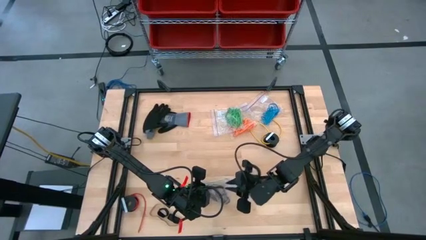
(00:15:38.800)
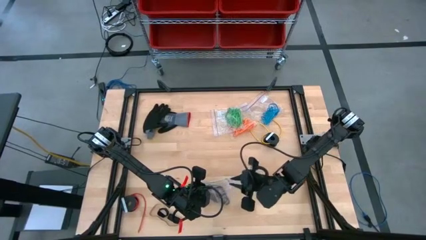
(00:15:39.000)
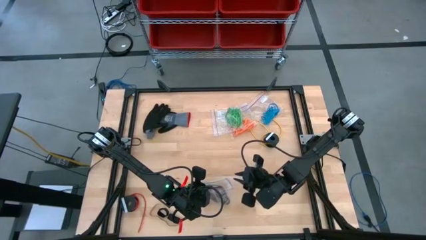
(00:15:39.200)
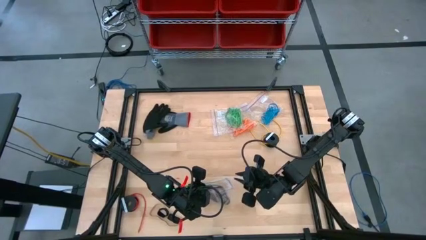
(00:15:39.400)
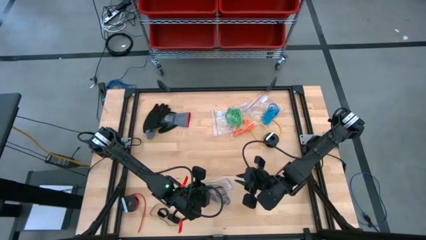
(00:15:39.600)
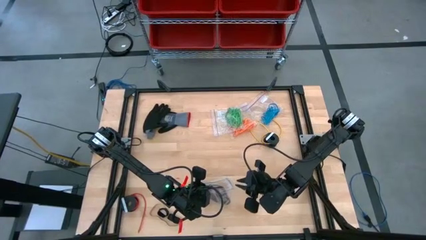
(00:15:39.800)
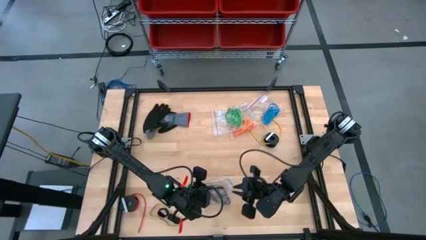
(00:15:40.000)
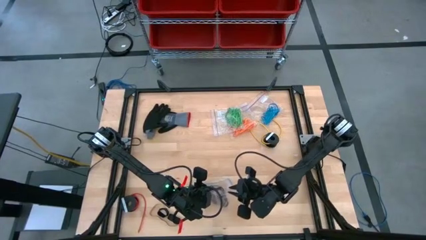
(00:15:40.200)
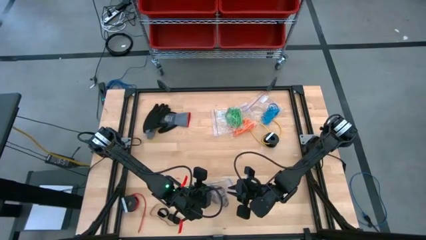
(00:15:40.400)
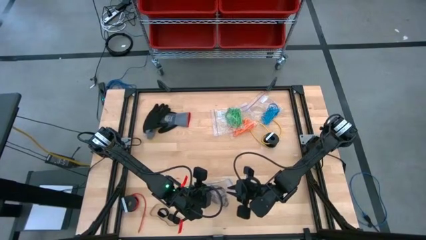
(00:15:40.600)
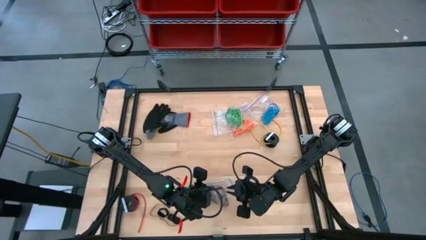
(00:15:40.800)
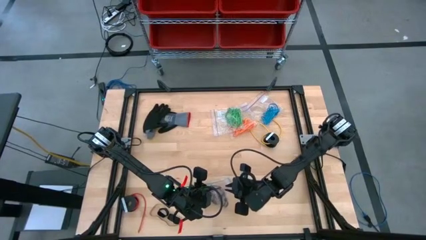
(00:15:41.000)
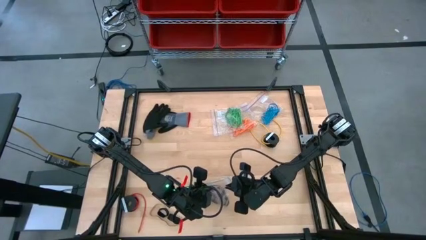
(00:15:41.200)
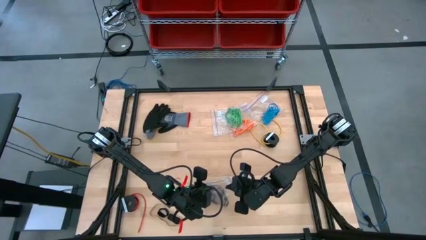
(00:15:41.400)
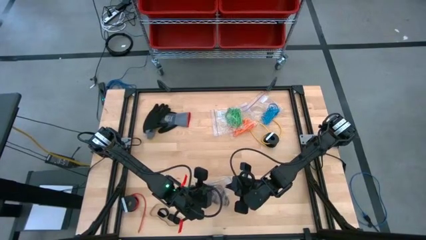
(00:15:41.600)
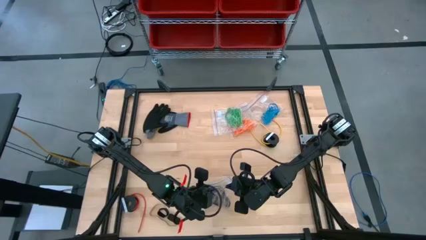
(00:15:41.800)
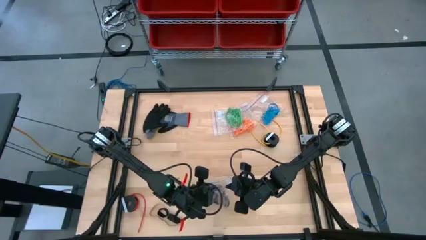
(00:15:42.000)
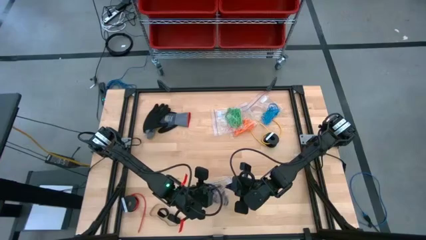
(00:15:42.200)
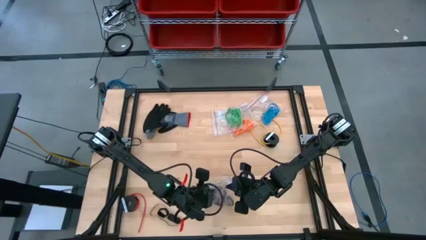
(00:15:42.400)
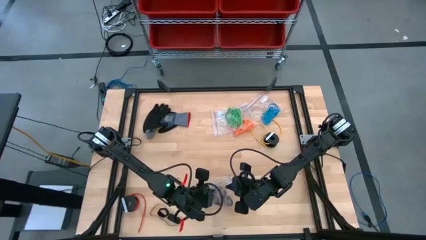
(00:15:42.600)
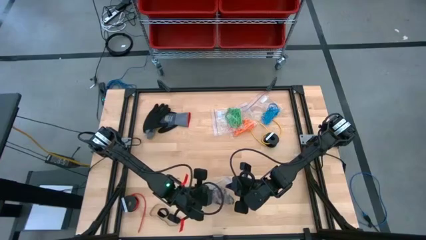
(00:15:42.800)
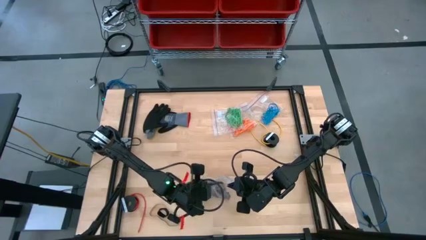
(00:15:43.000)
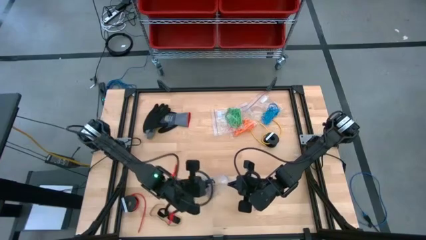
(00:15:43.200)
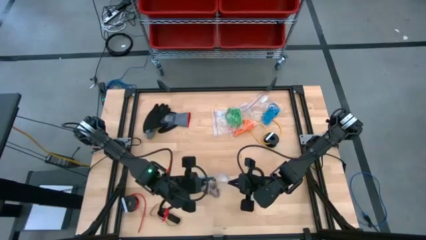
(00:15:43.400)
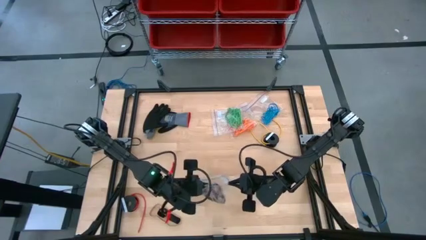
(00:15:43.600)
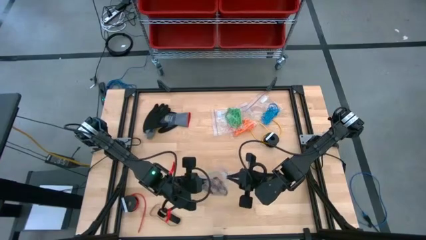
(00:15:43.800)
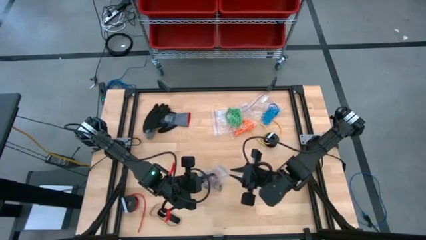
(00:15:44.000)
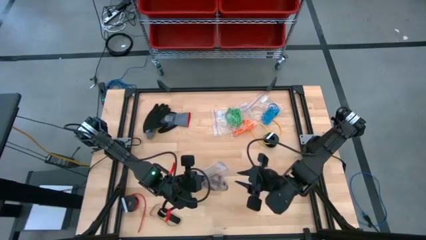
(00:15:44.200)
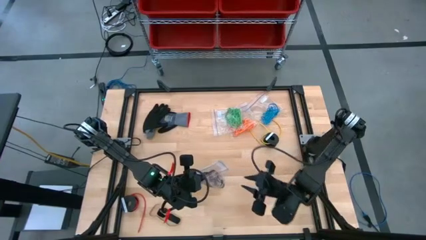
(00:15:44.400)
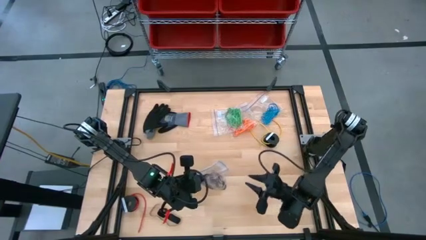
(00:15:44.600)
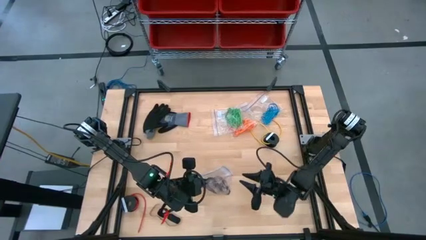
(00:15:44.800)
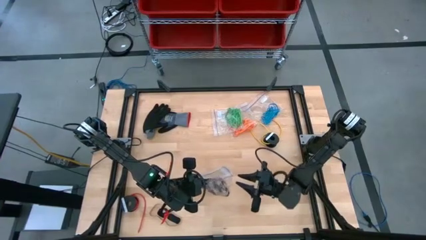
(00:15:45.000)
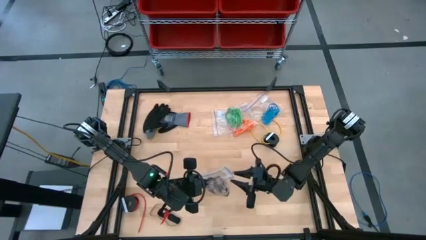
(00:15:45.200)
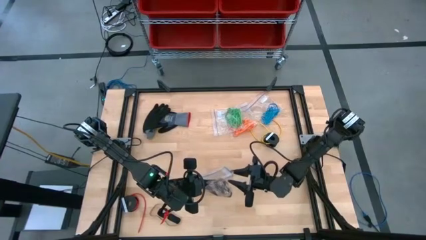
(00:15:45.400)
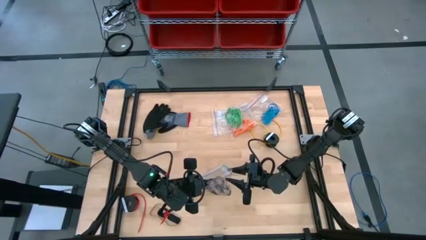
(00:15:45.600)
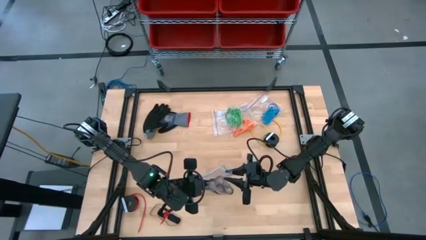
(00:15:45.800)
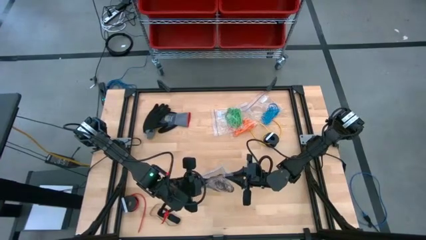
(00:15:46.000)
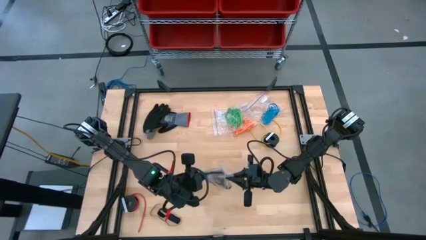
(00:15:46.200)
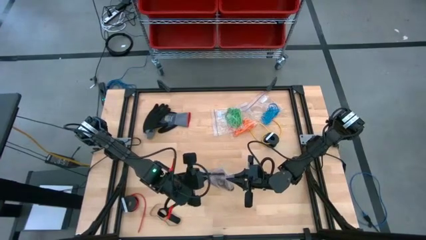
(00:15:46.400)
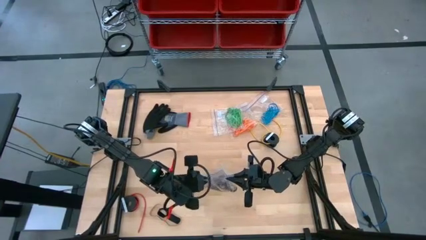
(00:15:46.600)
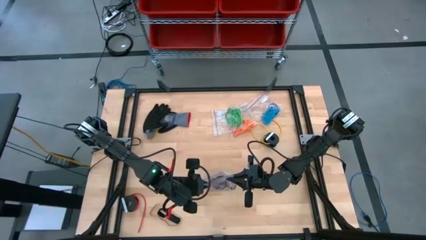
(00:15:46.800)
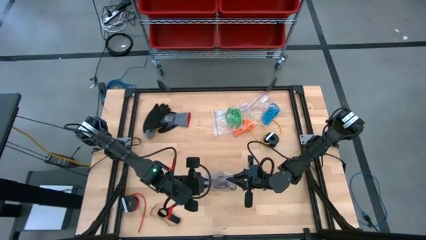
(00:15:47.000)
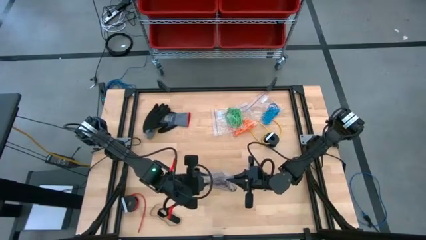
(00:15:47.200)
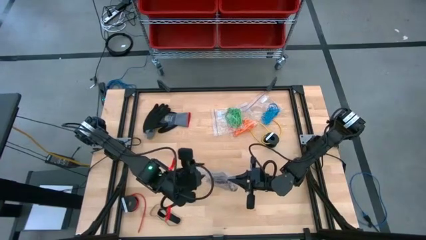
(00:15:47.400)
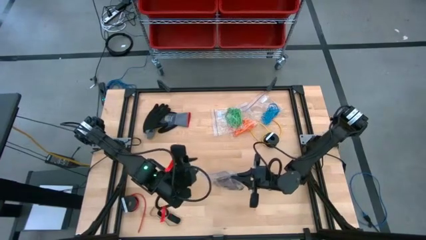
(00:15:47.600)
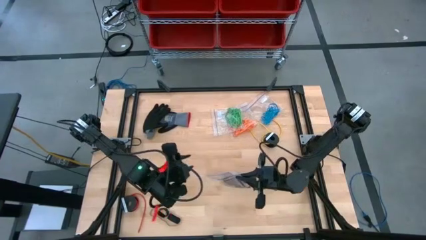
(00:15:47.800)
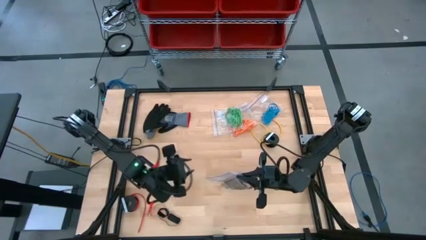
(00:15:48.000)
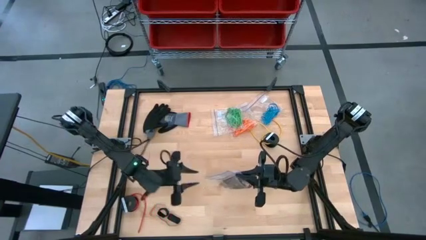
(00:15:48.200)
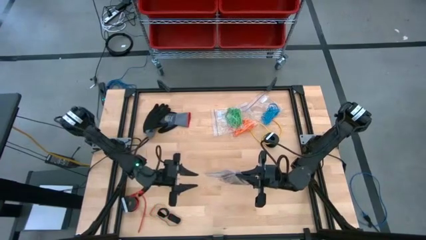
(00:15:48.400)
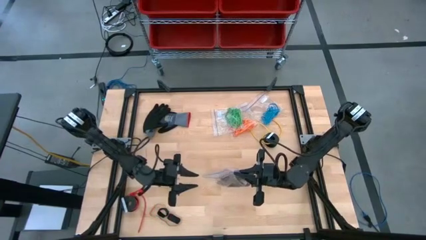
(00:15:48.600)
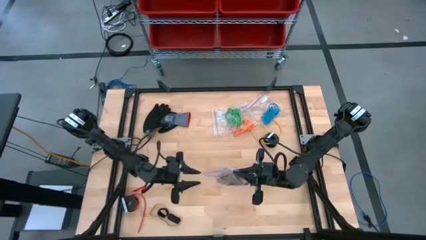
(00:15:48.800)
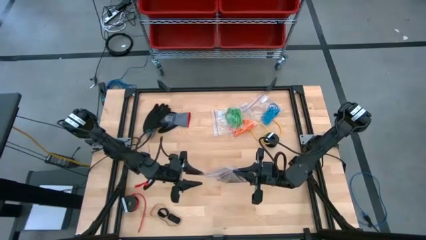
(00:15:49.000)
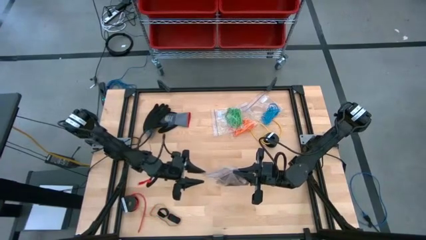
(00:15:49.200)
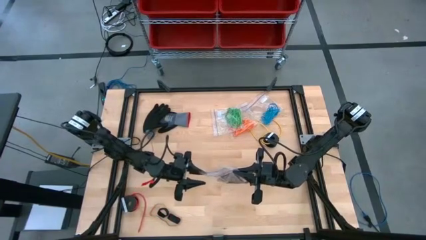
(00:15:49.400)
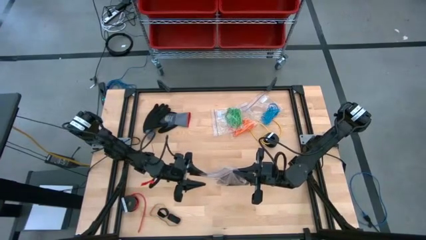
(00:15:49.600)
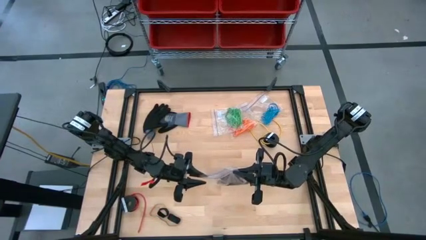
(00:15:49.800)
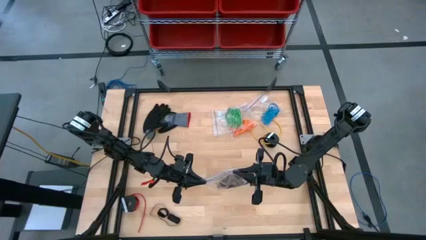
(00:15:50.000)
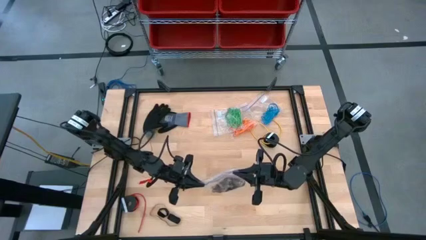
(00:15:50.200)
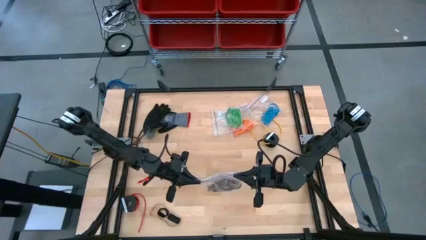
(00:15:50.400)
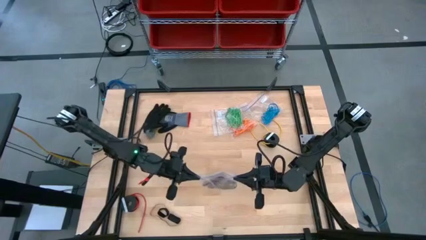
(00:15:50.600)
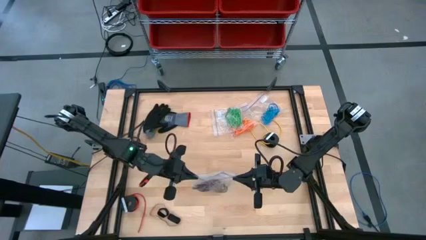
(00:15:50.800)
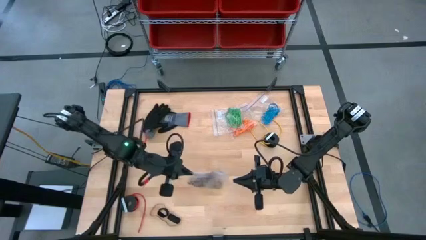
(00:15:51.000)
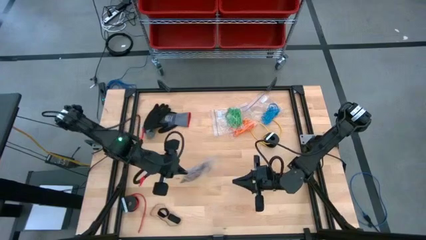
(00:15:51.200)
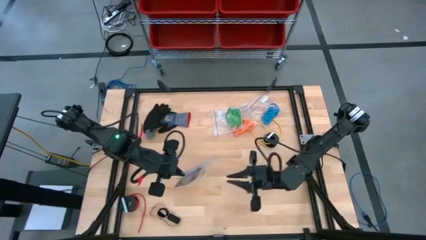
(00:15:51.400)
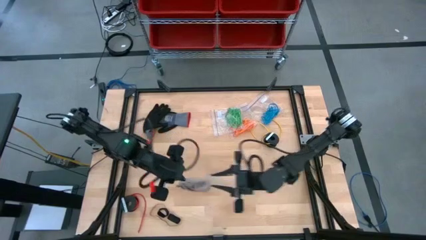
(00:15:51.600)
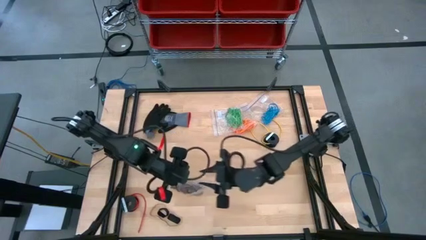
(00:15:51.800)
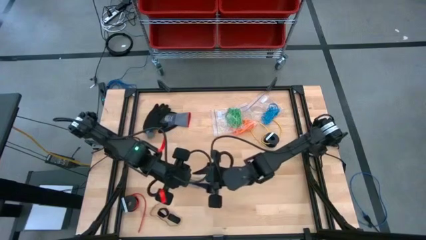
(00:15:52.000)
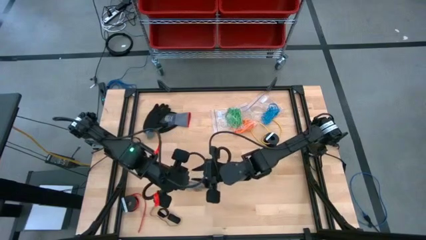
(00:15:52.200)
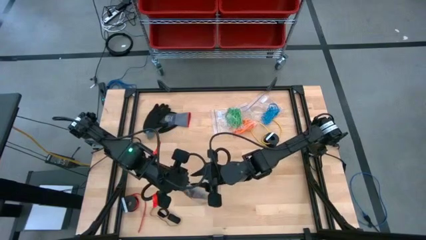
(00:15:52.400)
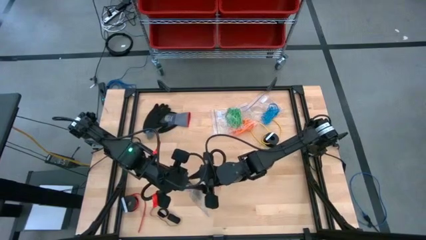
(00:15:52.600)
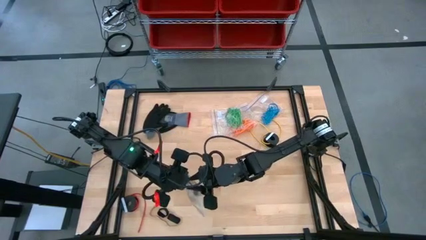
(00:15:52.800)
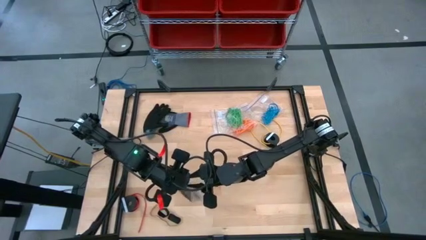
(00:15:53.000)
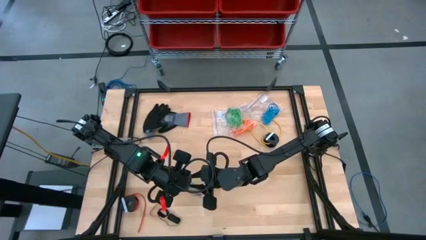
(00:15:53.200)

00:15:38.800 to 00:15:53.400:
Task: Sort rubber bands
Close the transparent zip bag
